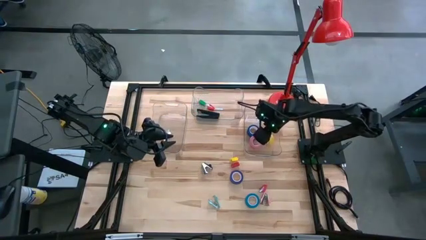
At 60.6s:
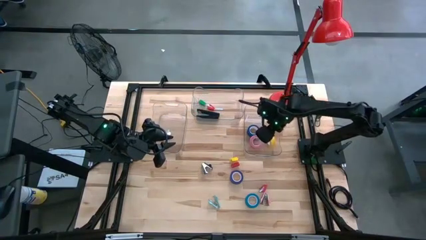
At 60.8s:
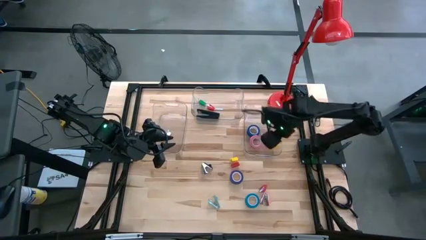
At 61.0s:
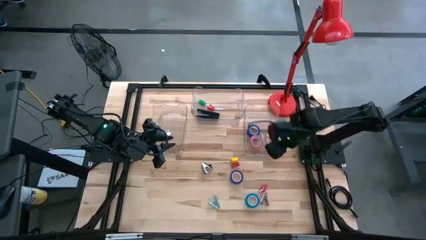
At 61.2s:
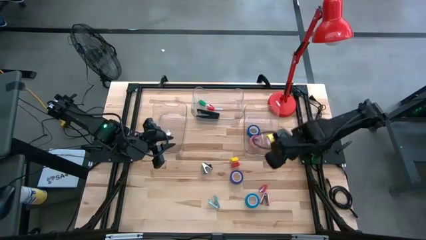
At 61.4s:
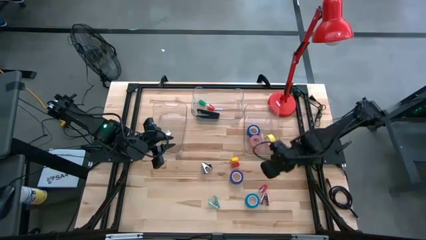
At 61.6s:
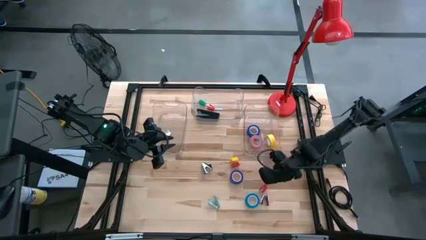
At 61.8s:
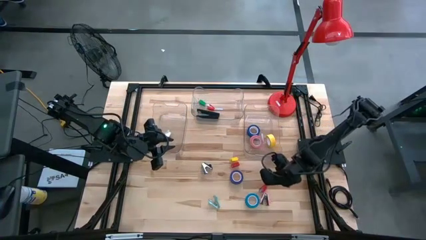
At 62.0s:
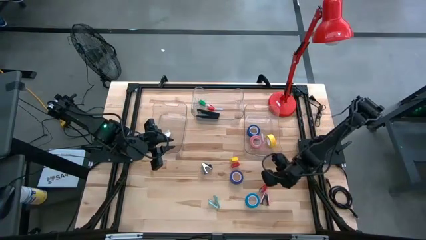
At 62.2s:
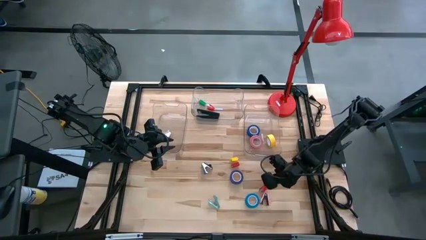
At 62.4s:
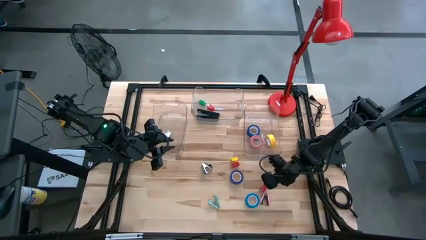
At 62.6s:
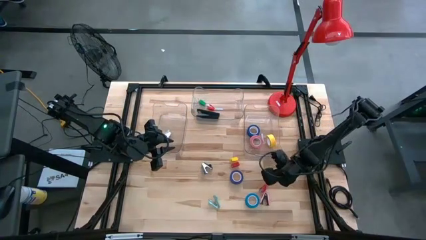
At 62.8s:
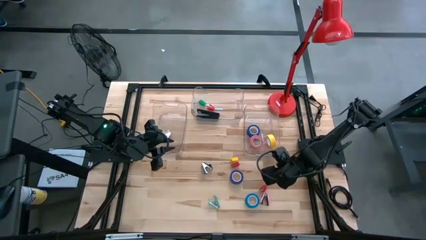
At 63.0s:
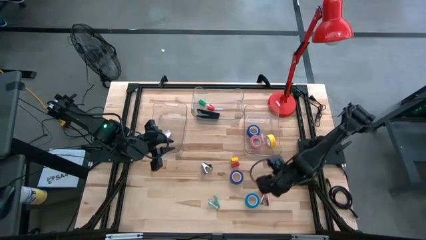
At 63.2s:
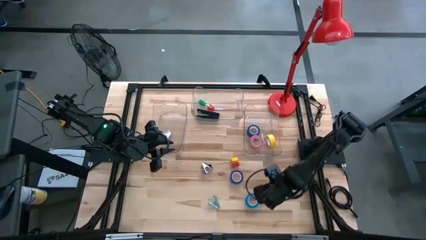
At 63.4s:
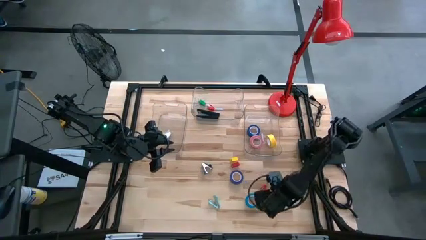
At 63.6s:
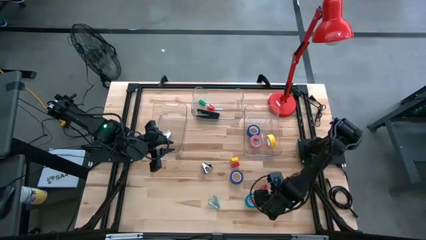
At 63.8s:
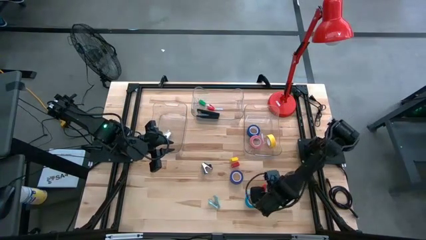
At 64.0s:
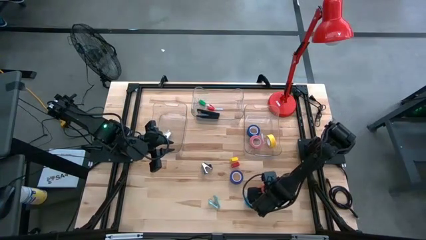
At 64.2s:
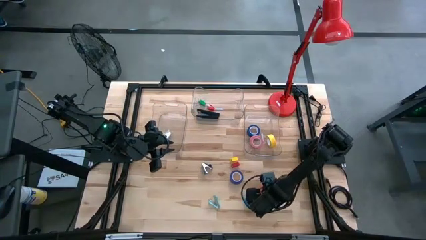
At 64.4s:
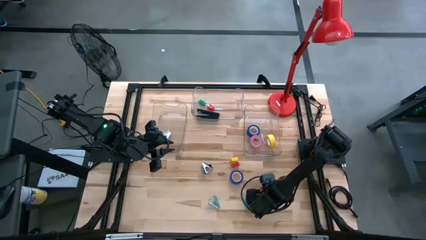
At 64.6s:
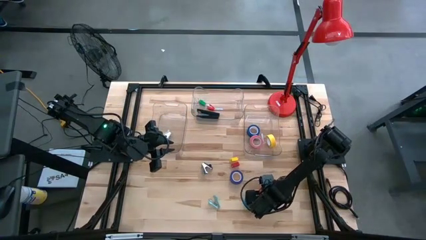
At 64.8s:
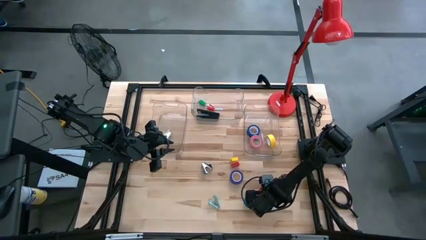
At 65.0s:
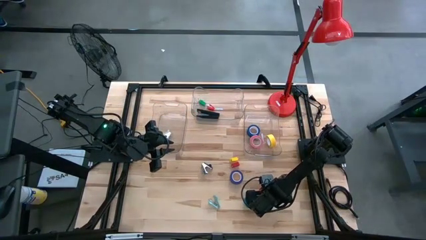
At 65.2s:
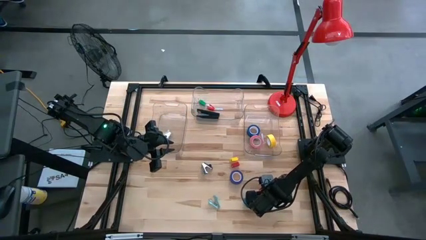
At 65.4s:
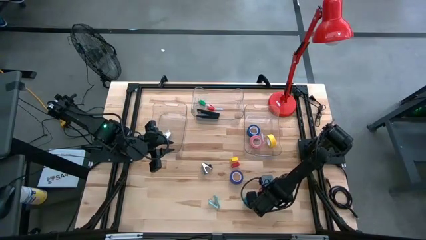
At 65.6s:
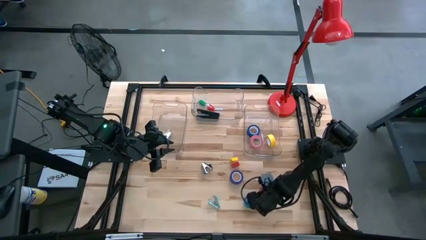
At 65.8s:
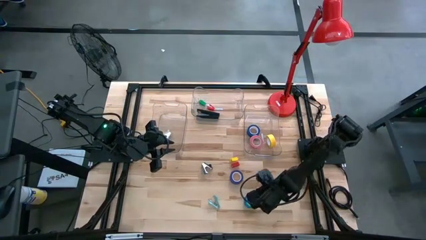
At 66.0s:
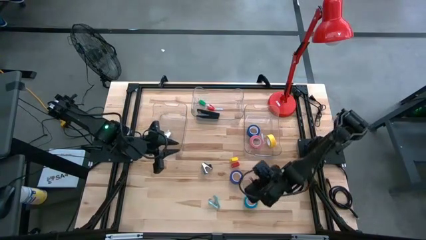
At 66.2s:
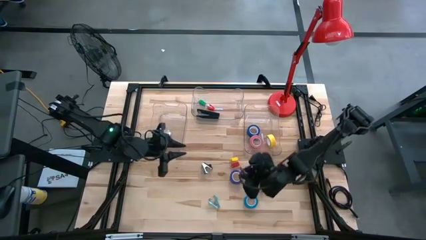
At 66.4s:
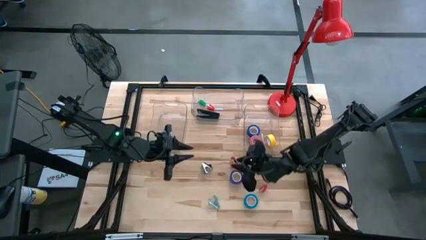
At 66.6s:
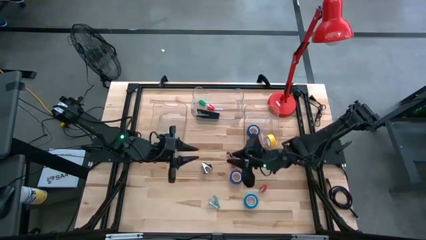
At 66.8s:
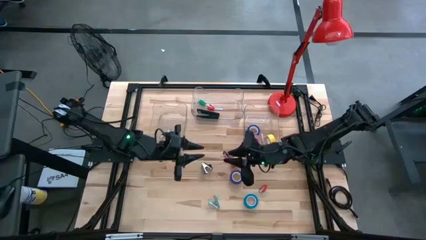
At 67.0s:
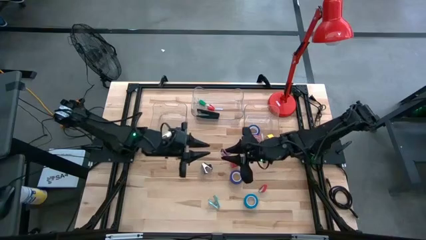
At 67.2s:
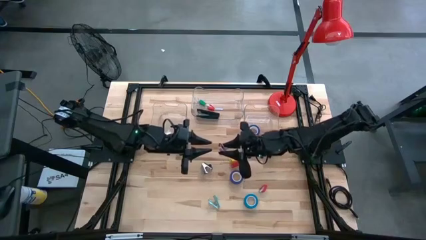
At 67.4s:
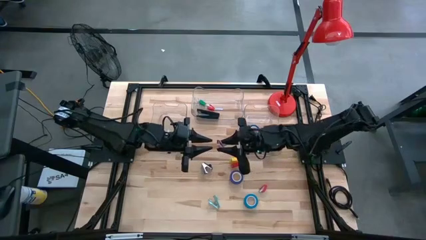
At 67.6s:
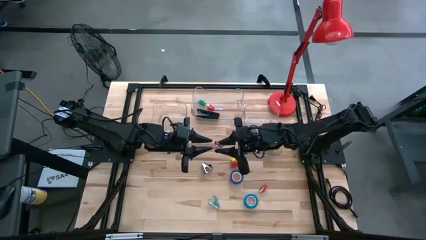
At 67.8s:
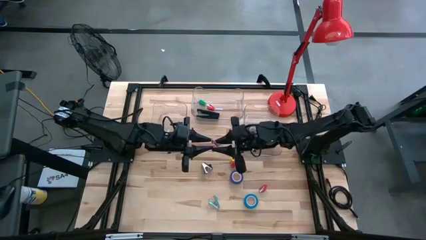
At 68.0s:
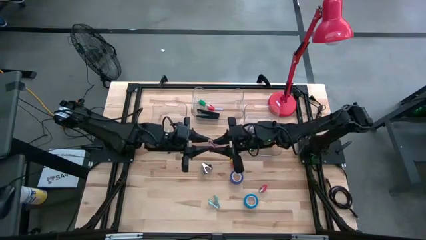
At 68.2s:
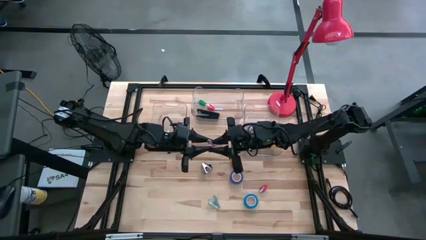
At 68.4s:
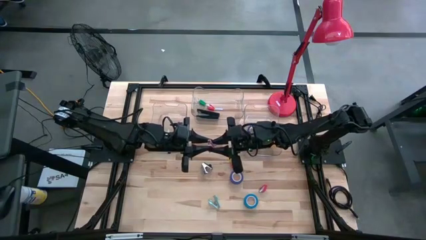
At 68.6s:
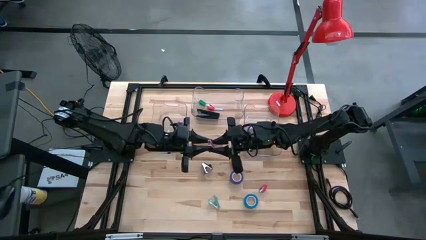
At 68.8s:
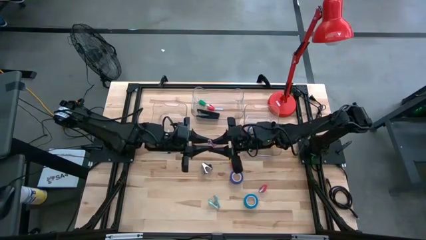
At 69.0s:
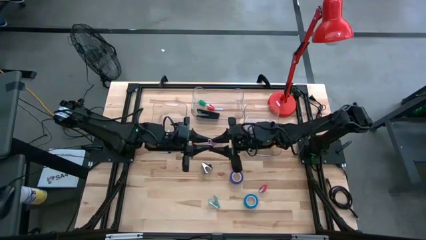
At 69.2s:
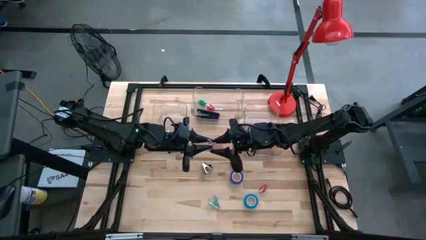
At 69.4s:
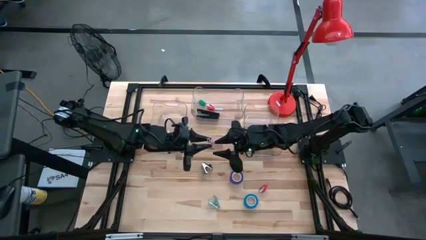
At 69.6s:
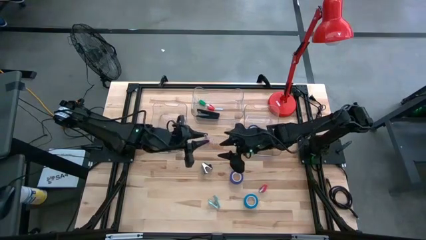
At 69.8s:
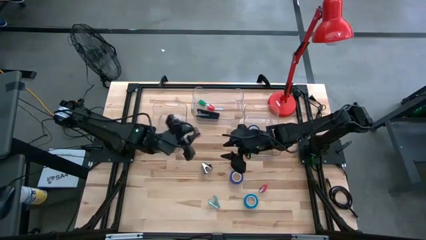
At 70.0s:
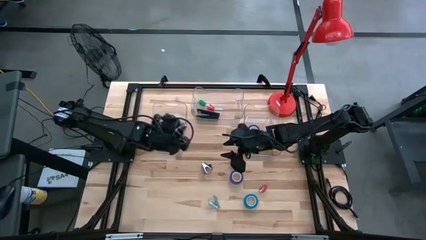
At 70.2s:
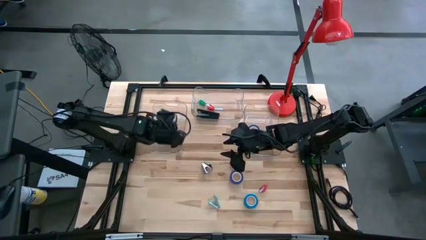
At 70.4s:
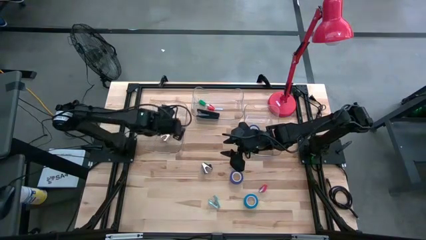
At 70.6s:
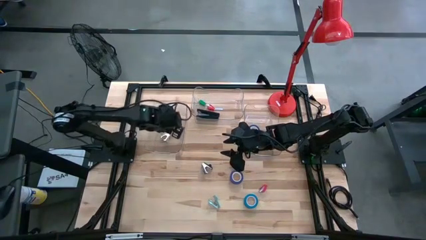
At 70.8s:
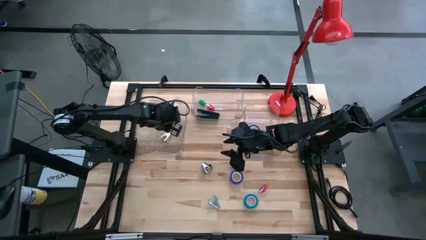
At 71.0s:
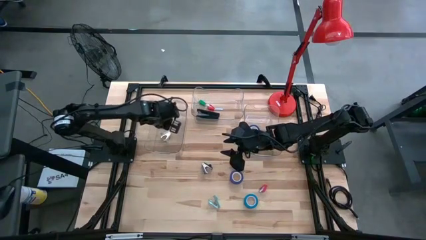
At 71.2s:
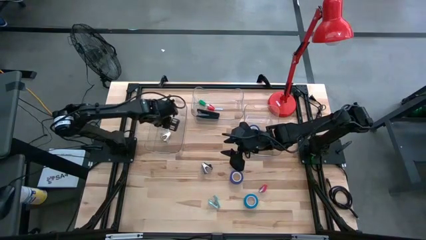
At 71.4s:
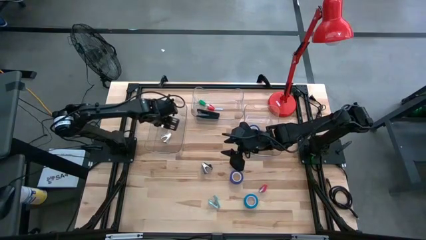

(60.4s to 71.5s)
Task: Pick and place Stapler, Stapler remover, tape
Put the pink staple remover into the bottom left transparent bin

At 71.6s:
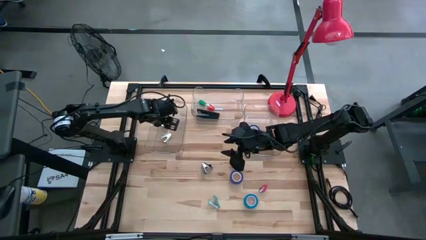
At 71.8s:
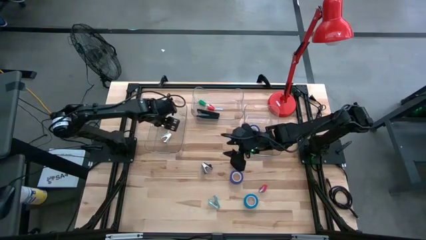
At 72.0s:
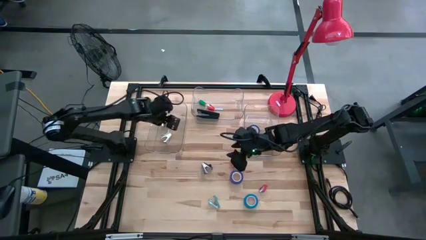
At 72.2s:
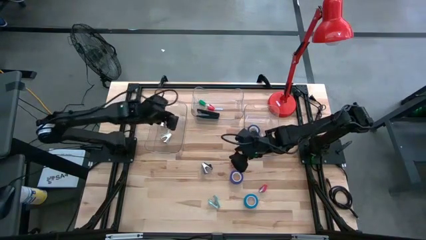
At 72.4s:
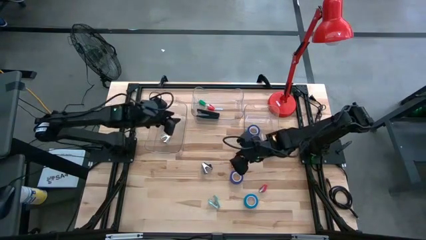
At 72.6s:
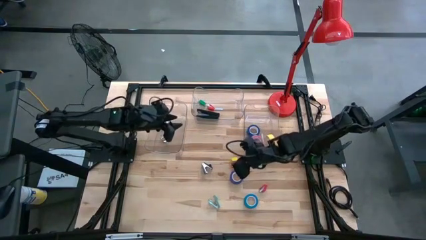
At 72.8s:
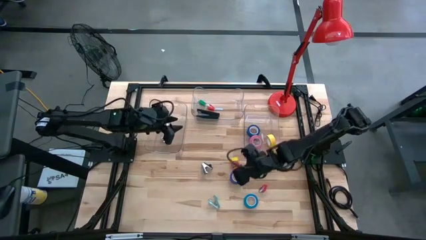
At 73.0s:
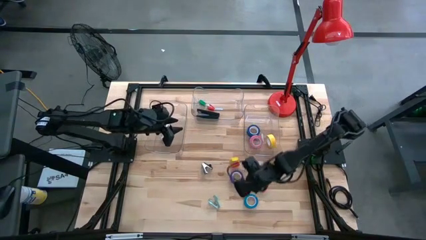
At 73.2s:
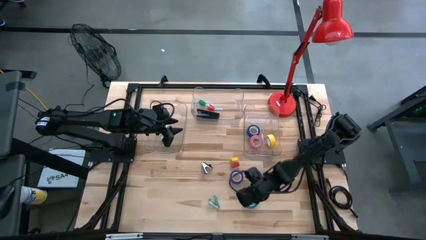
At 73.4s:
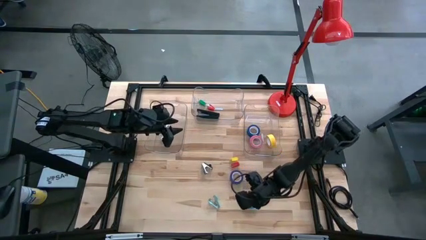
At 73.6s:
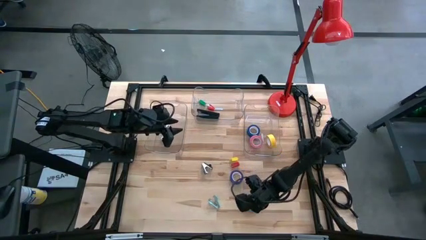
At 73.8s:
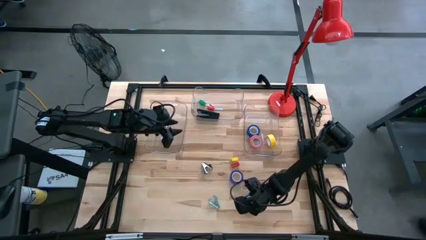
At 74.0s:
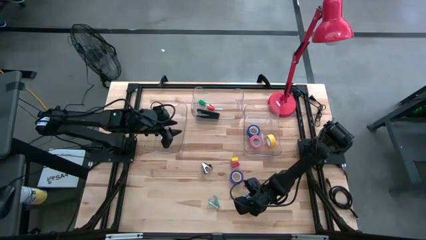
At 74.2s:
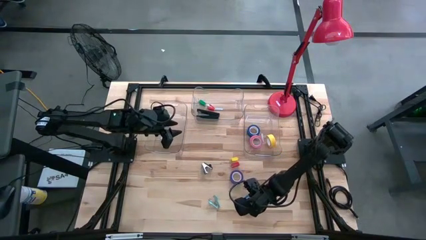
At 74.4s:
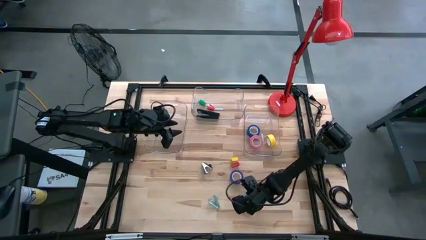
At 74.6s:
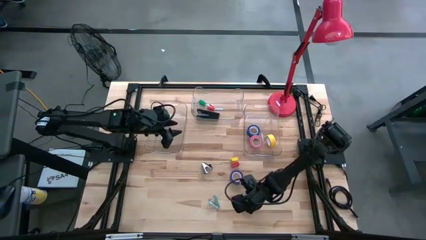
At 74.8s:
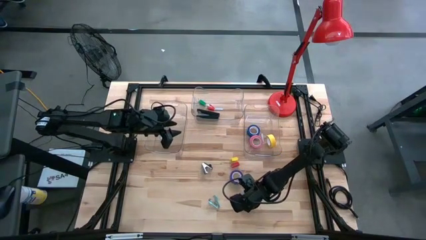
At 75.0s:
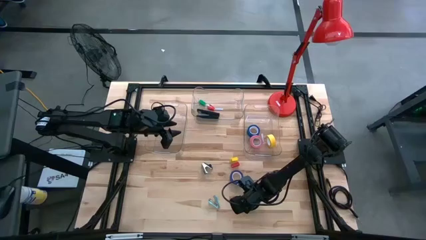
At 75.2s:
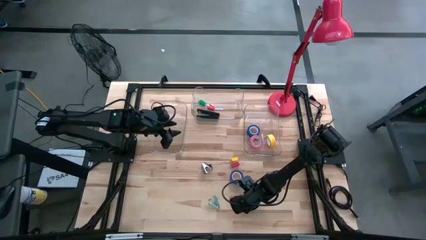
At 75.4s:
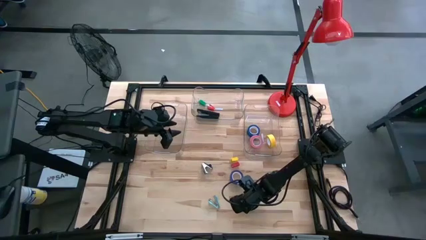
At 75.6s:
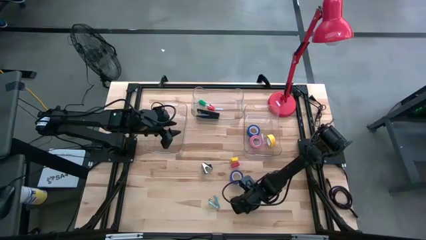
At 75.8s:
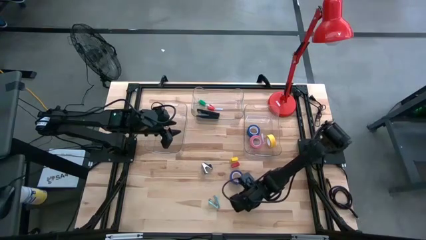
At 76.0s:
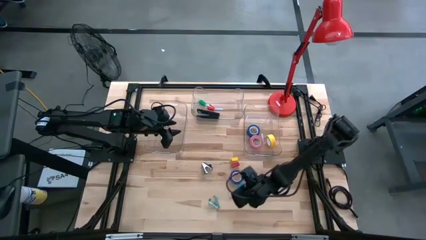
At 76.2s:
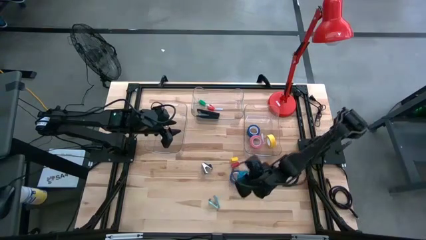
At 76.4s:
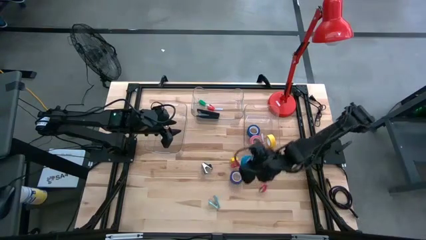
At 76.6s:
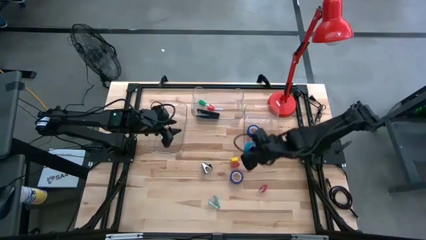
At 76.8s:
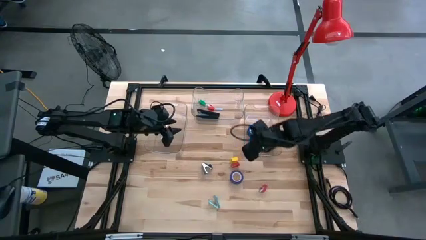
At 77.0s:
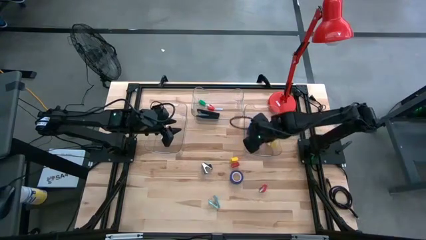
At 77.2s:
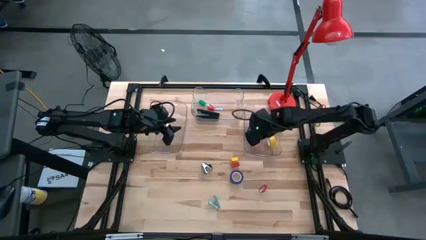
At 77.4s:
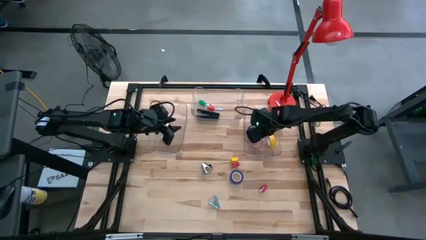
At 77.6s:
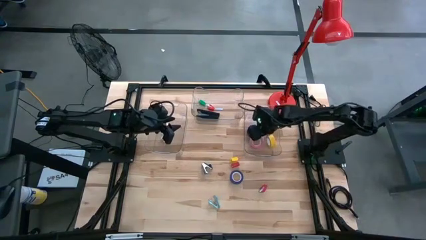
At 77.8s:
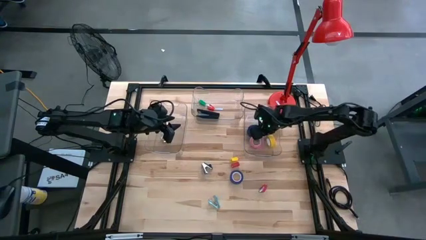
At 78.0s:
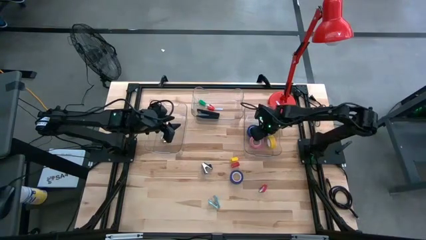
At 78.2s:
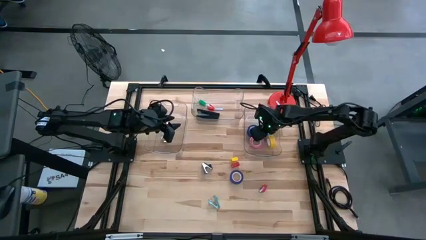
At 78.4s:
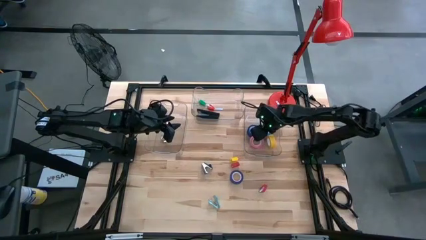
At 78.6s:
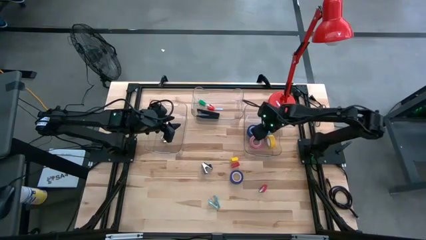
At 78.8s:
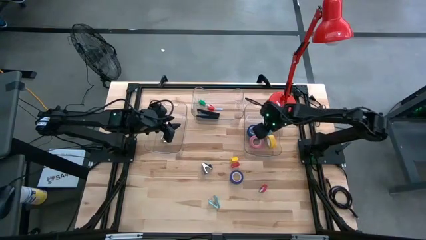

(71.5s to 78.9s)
Put the light blue tape into the bottom right transparent bin
